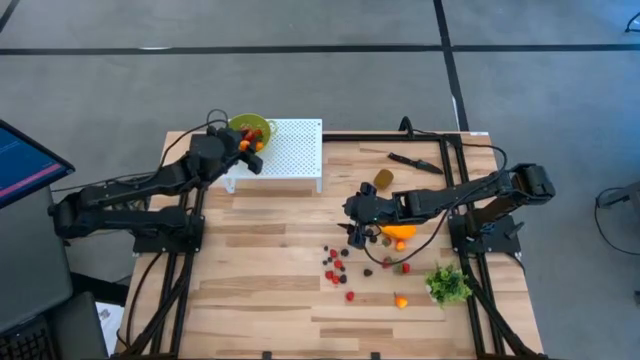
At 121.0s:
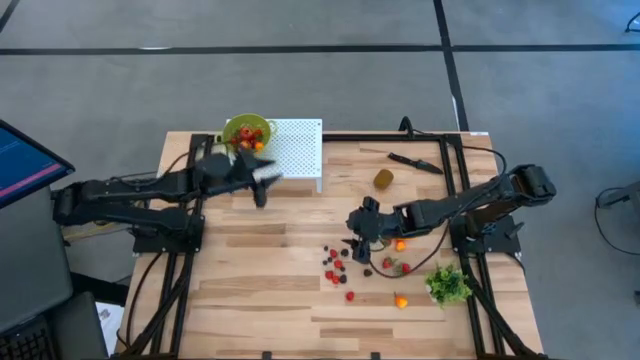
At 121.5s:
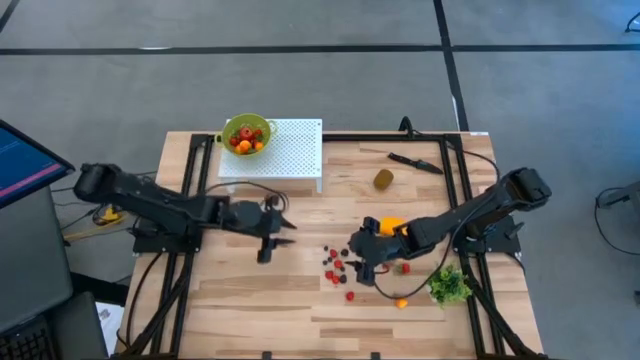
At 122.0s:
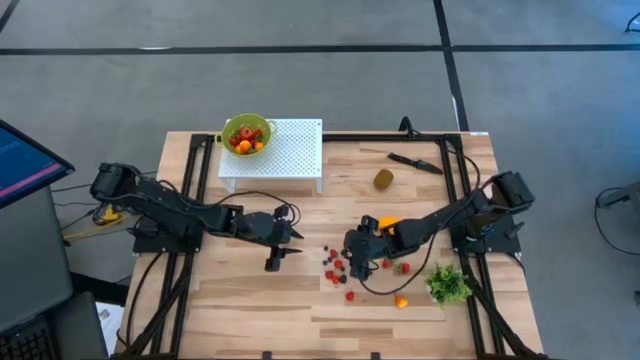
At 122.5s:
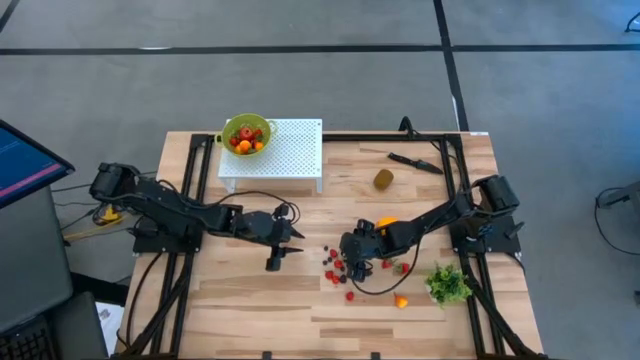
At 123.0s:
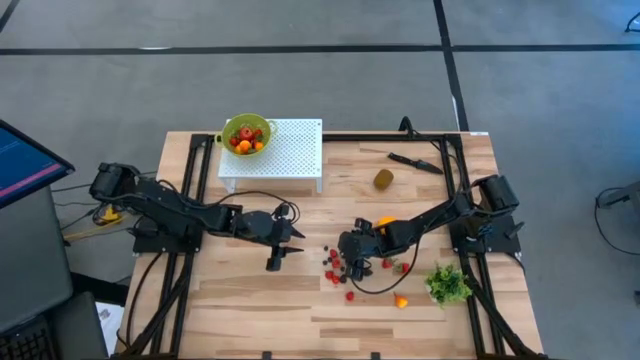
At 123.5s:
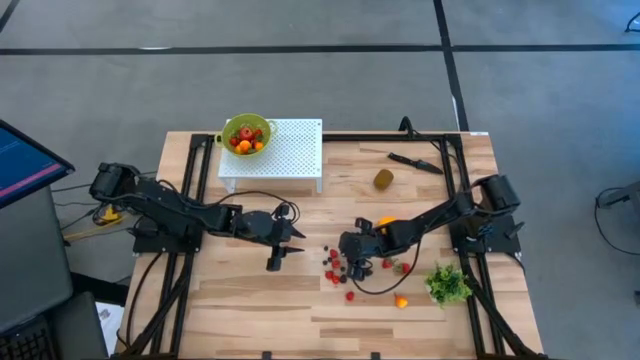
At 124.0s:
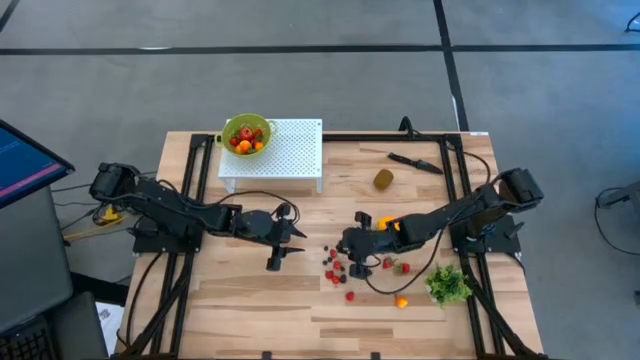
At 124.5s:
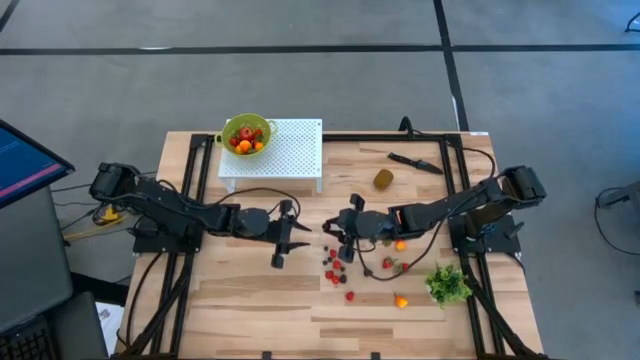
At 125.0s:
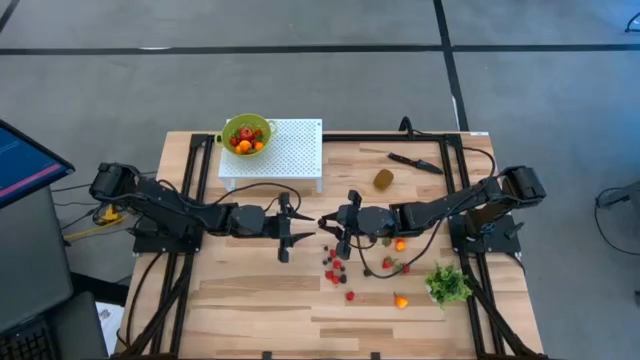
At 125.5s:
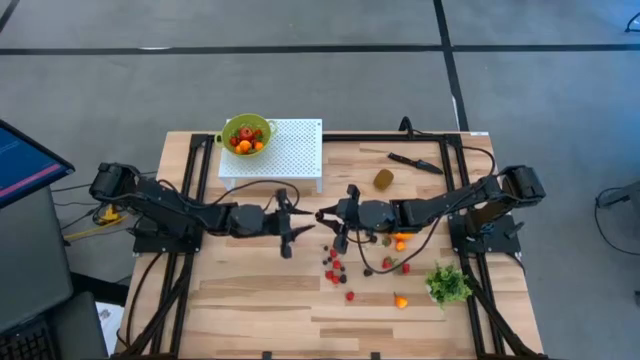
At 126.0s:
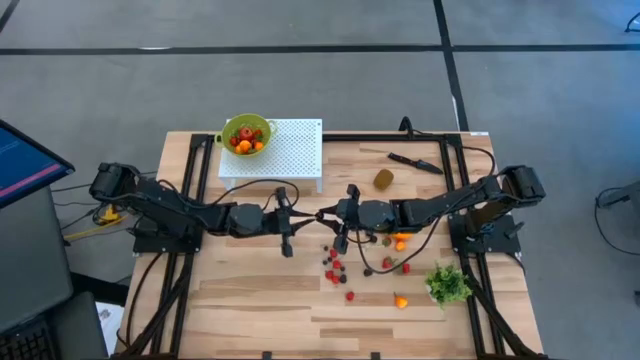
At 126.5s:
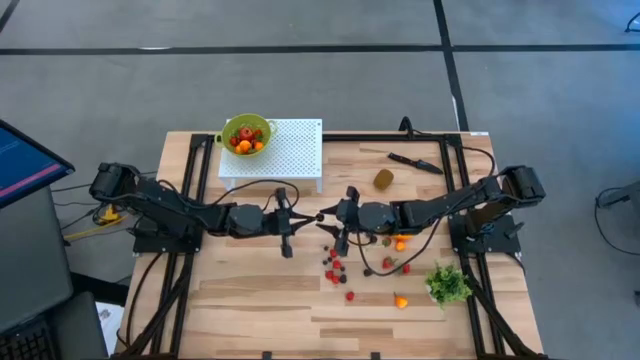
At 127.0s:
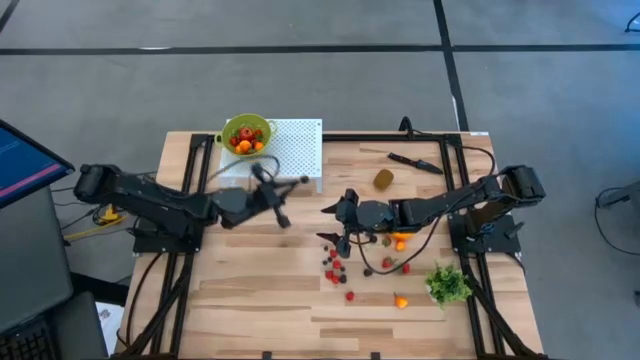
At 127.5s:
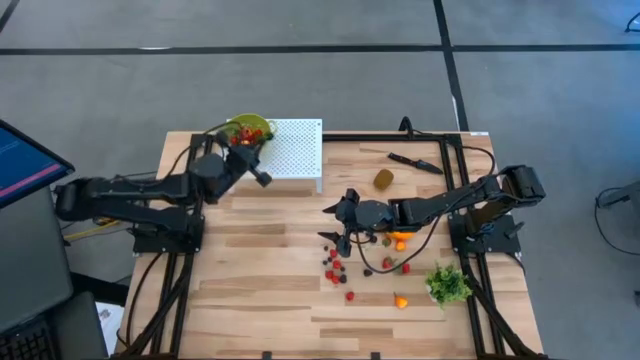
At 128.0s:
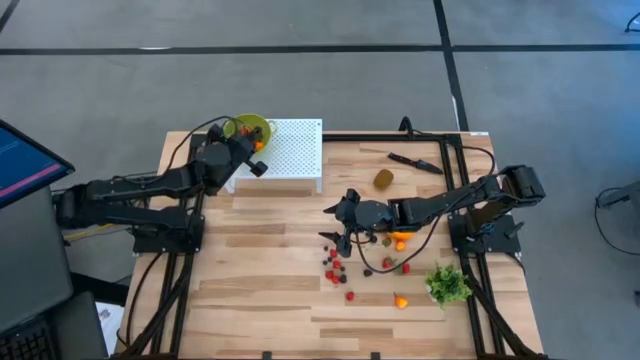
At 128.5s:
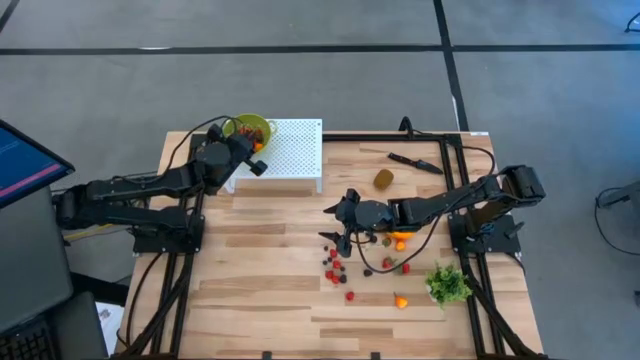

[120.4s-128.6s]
Task: Pick & Place Fruit
Put the black cherry into the green strainer bowl on the shelf

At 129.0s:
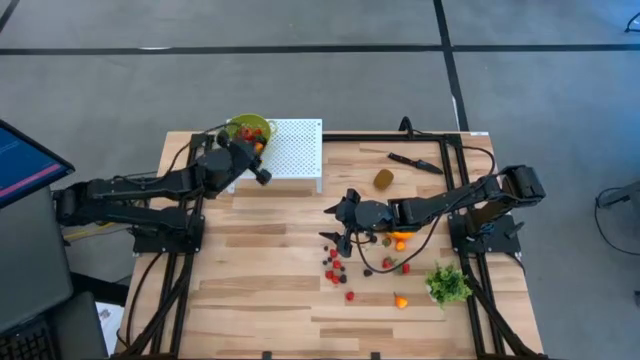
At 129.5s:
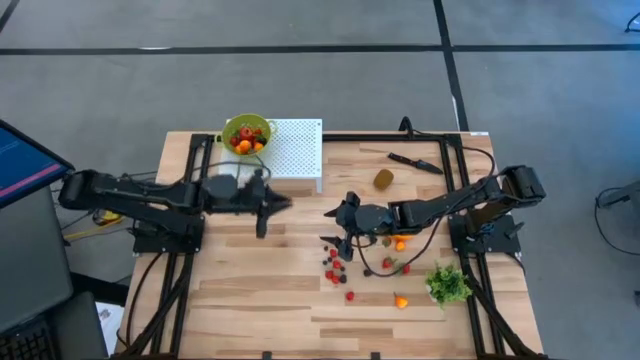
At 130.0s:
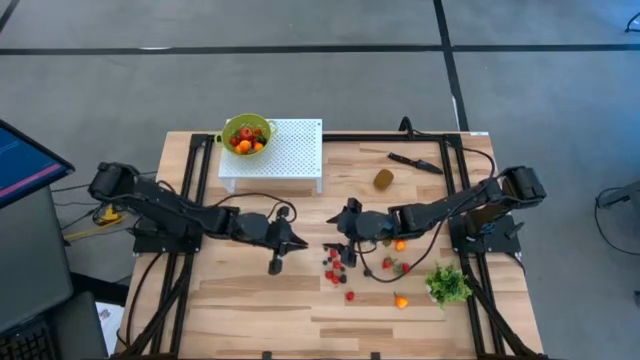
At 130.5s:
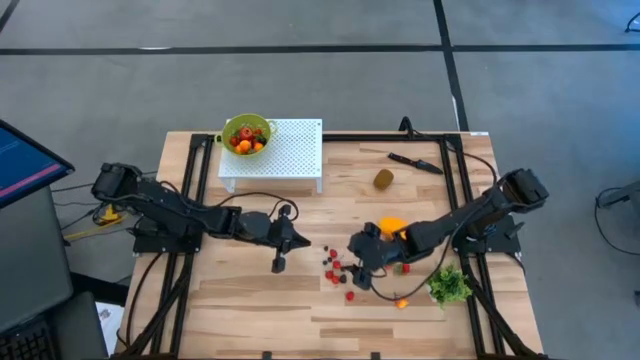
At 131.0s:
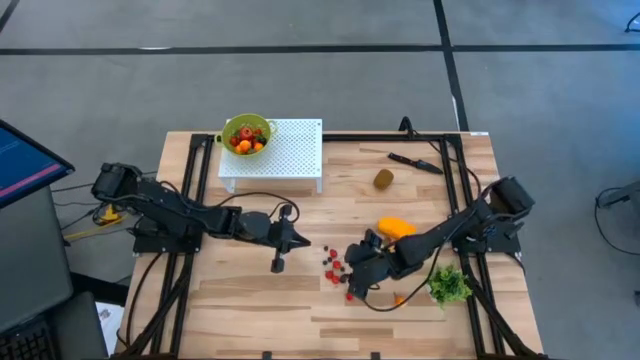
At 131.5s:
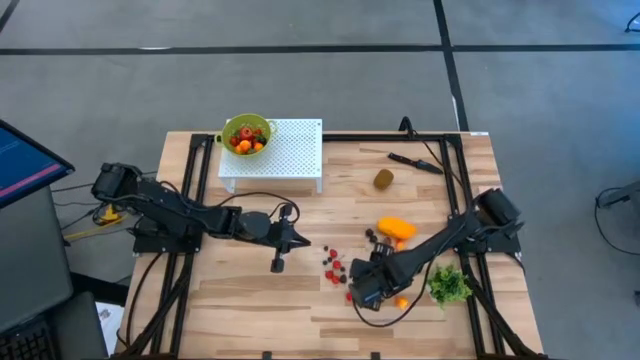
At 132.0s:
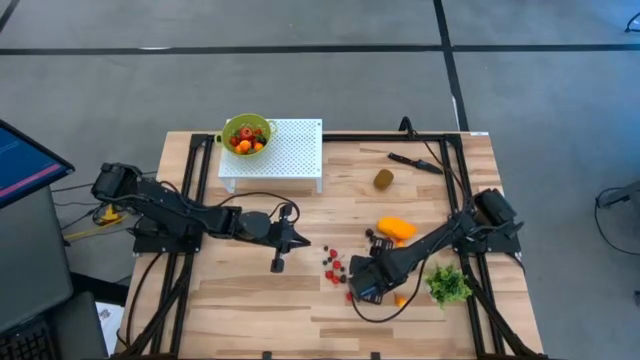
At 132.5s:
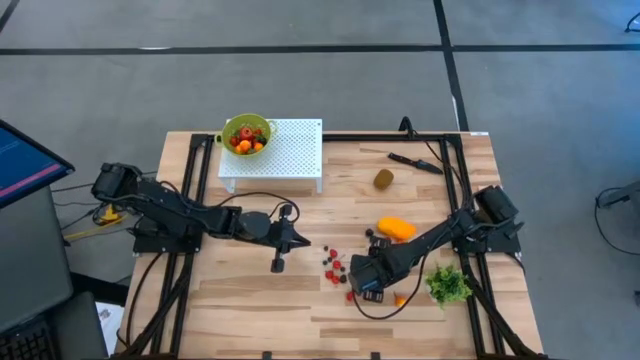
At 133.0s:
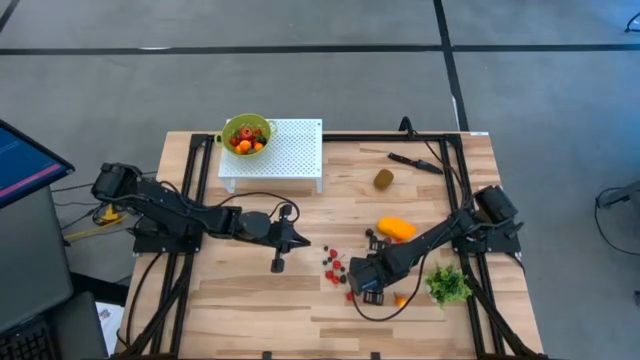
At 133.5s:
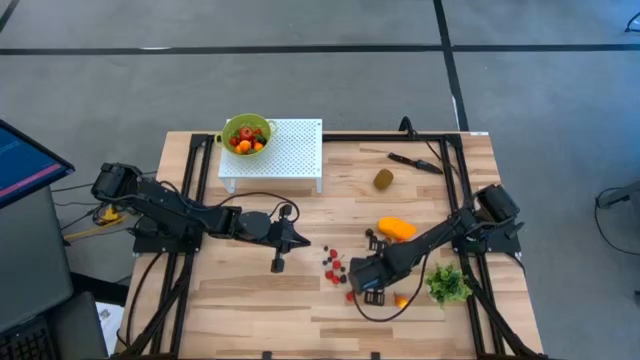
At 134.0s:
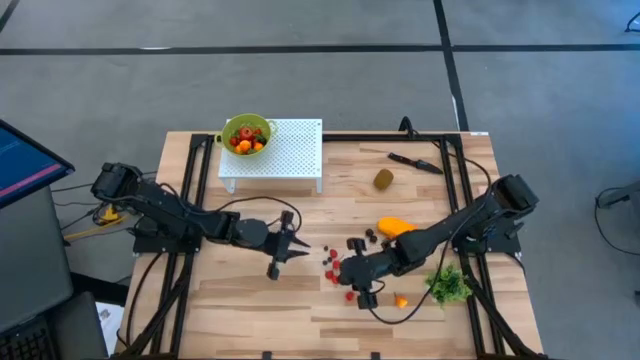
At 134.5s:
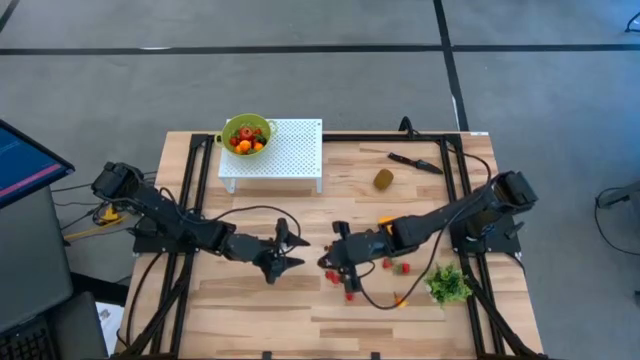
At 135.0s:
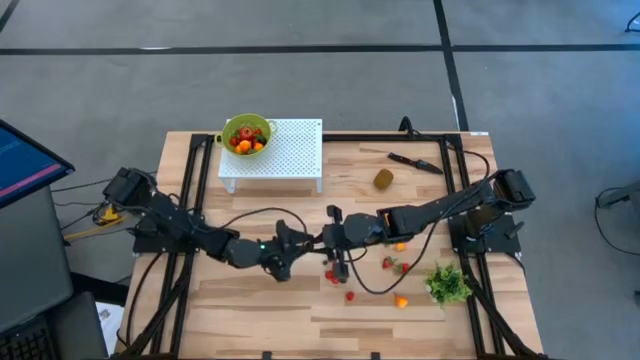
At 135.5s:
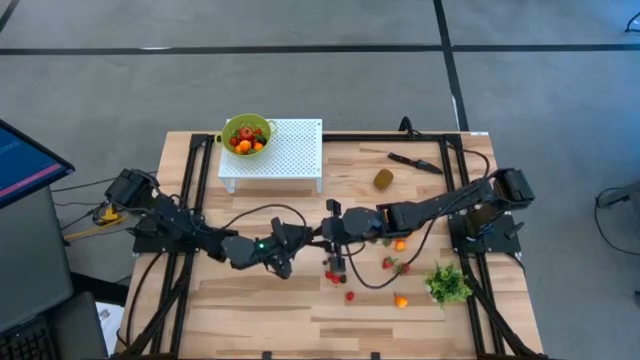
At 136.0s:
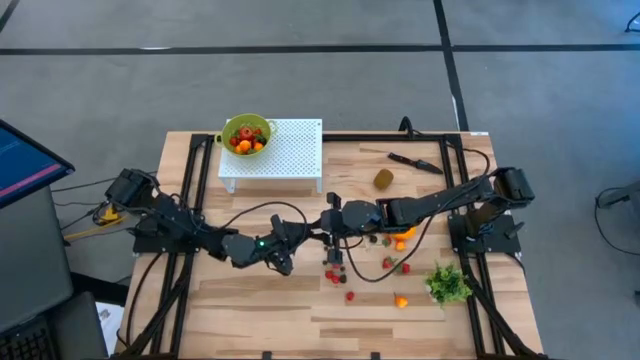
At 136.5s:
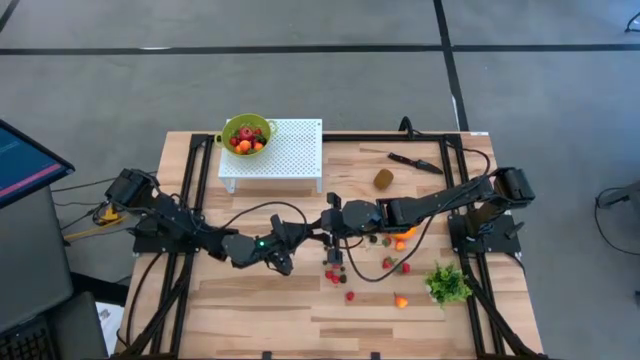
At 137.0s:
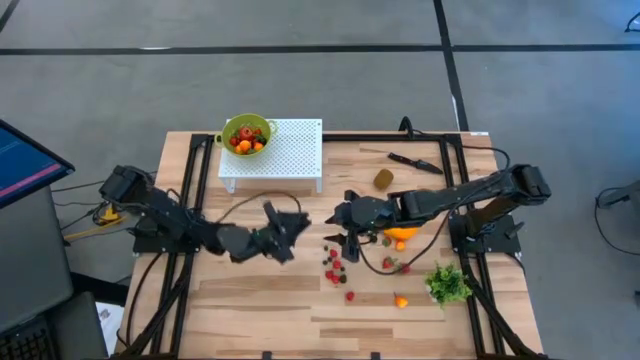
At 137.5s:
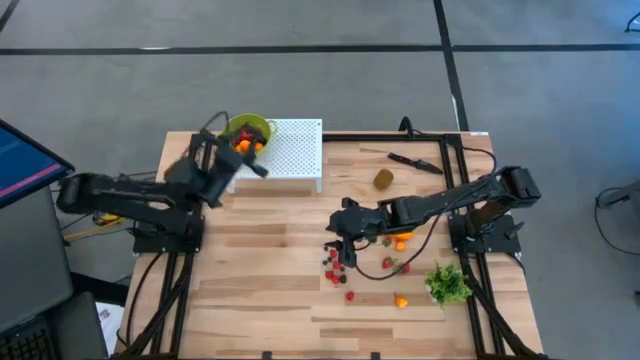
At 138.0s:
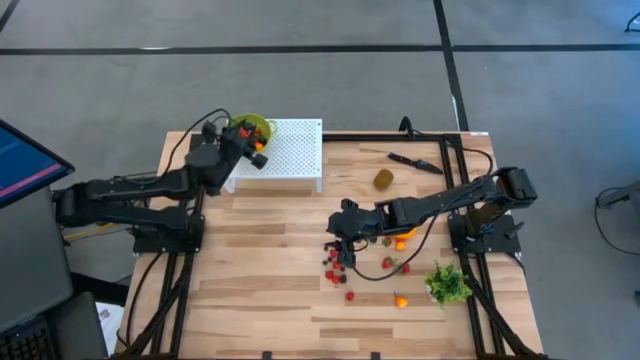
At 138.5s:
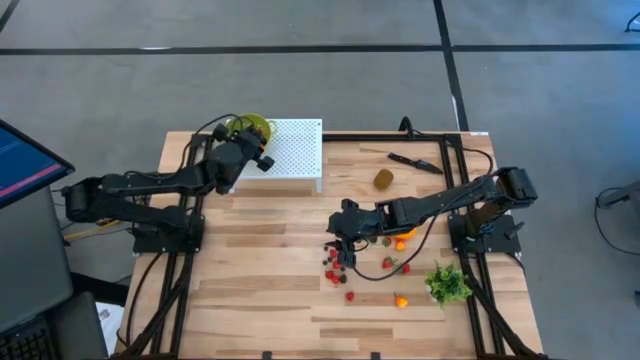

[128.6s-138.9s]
Put the blackberry into the green strainer bowl on the shelf

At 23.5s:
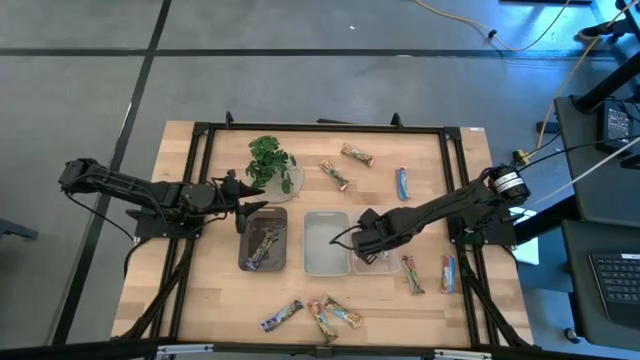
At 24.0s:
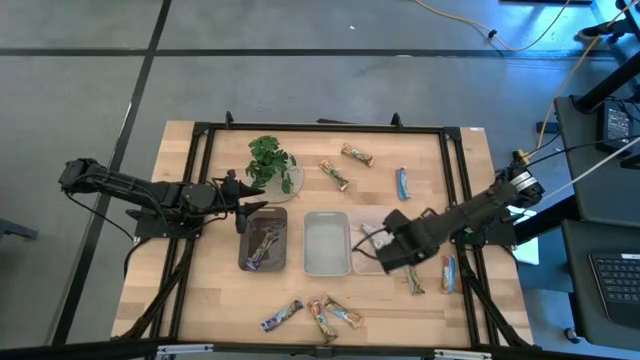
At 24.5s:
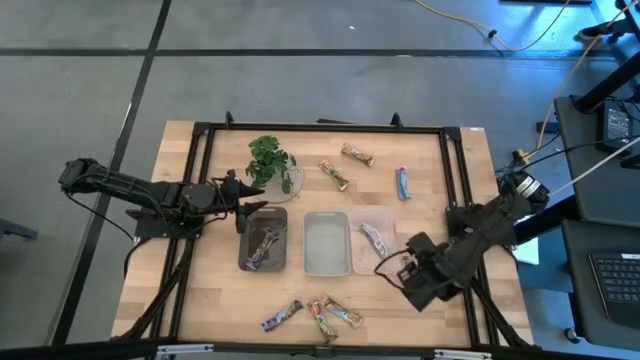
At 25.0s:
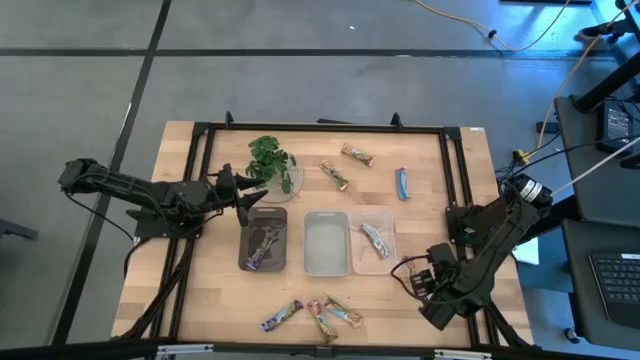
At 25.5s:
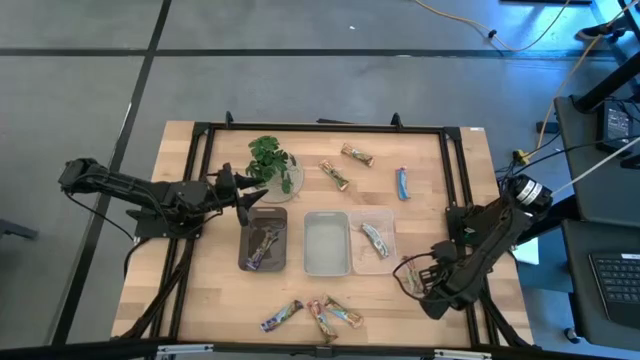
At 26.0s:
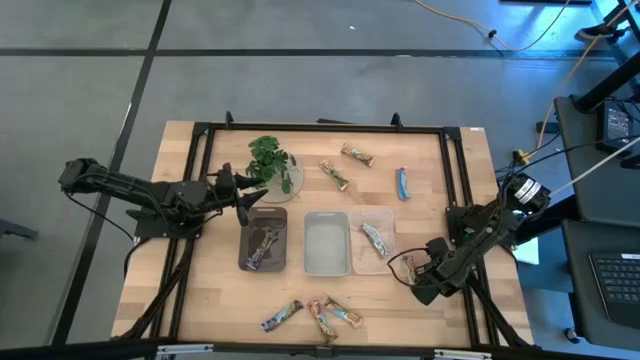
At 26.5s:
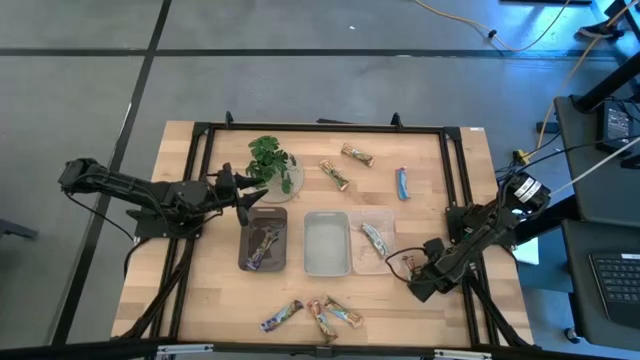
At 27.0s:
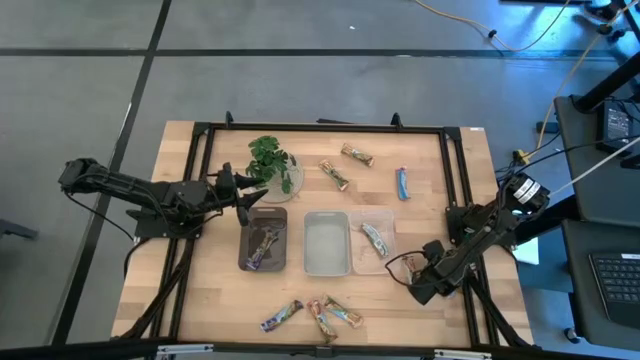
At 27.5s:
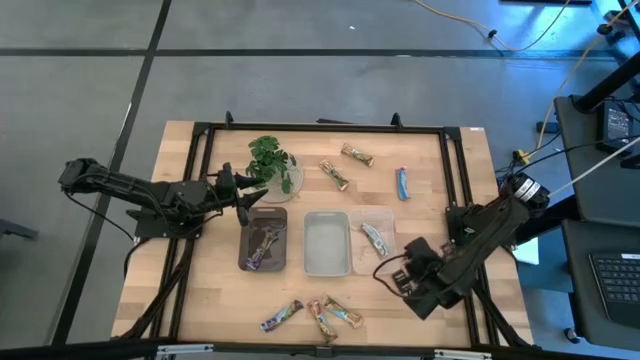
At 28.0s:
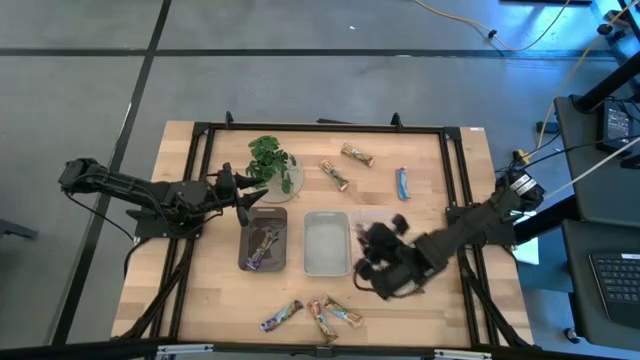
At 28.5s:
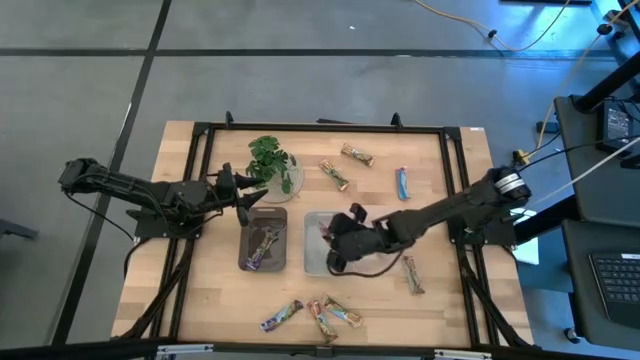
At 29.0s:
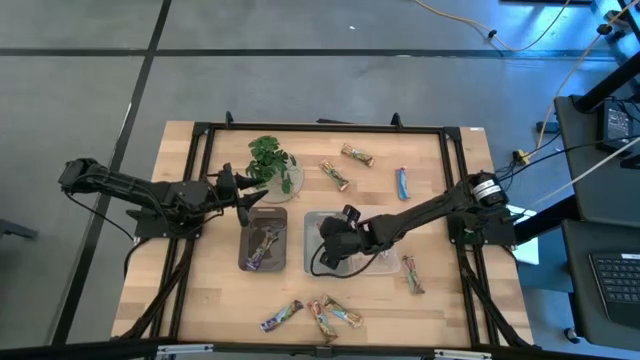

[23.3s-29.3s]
Task: Pick and place Granola Bars by type
Put the red granola bar into the grey bin
